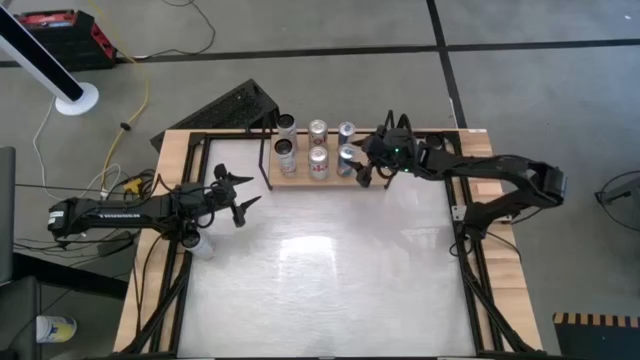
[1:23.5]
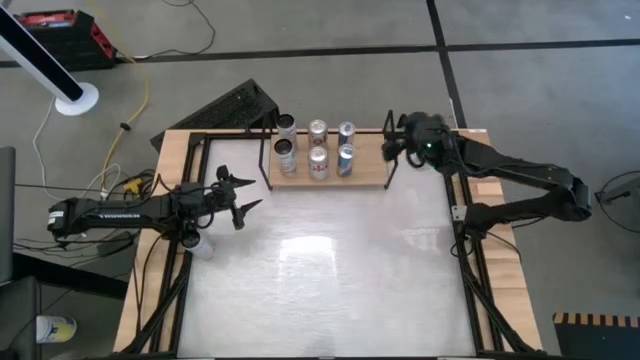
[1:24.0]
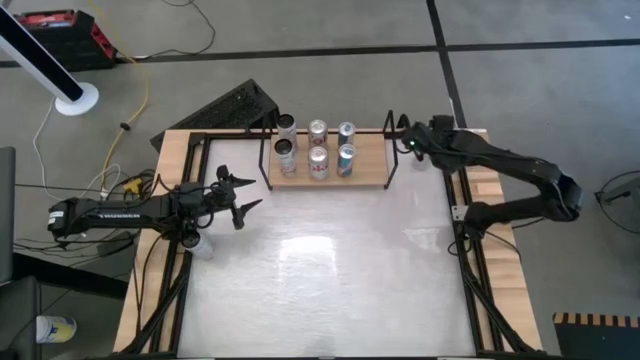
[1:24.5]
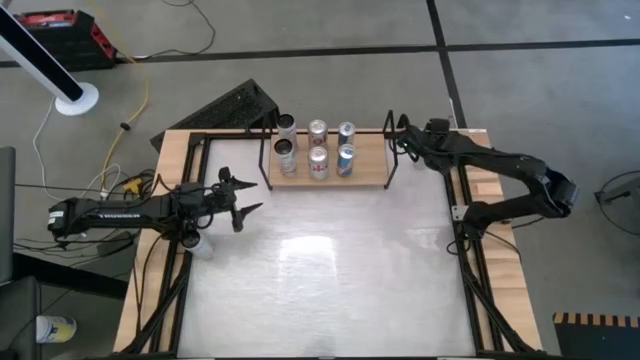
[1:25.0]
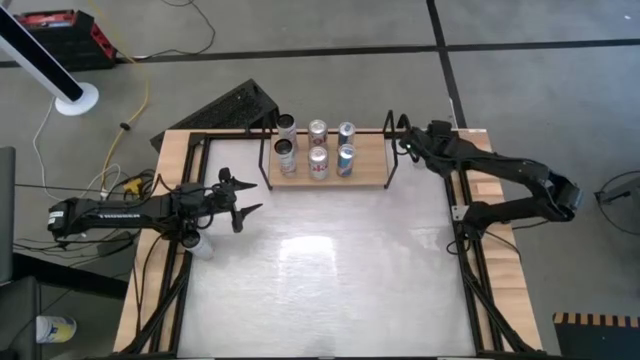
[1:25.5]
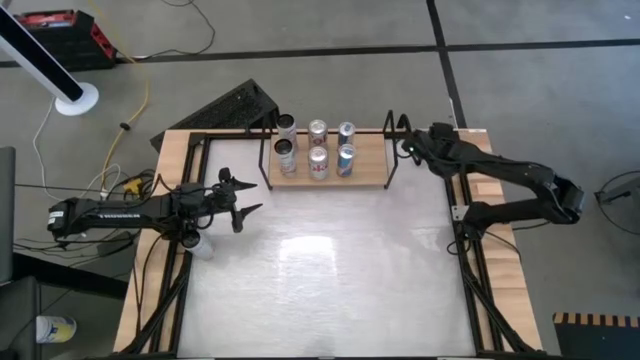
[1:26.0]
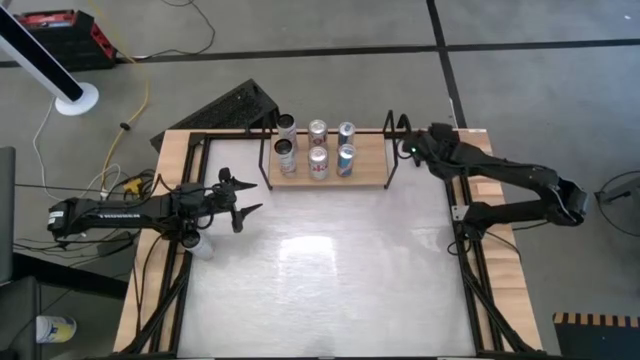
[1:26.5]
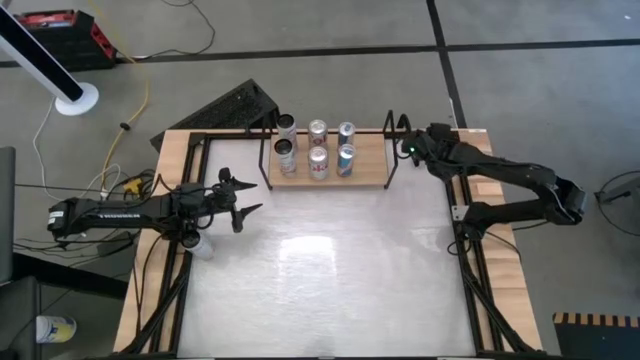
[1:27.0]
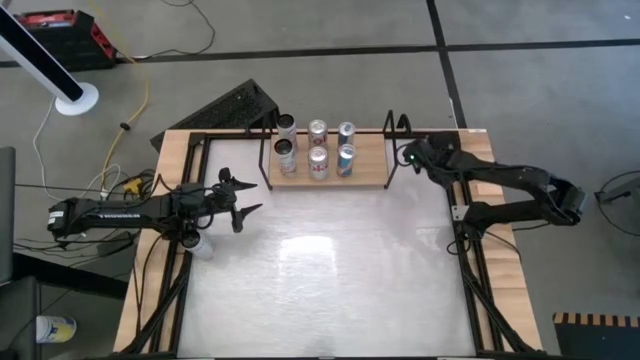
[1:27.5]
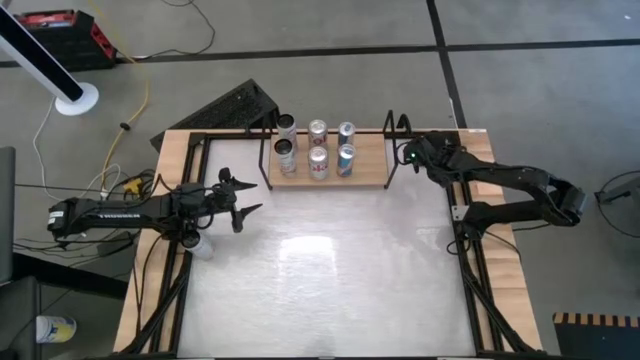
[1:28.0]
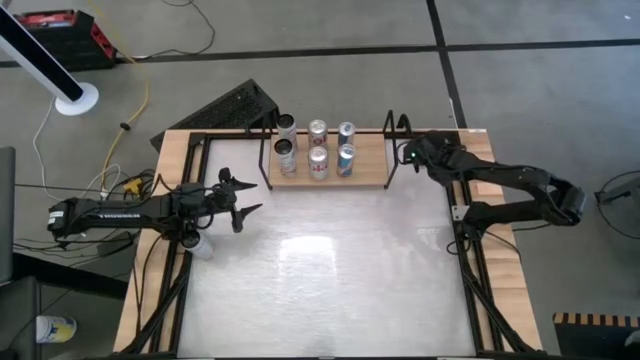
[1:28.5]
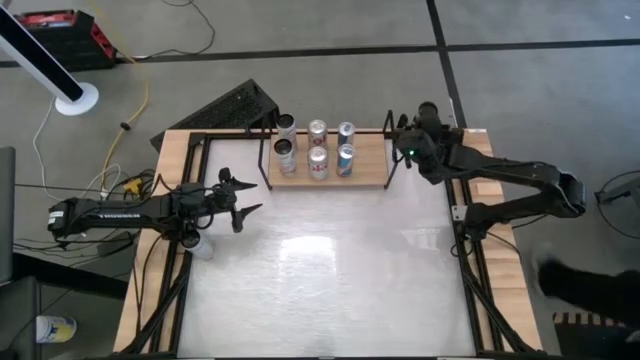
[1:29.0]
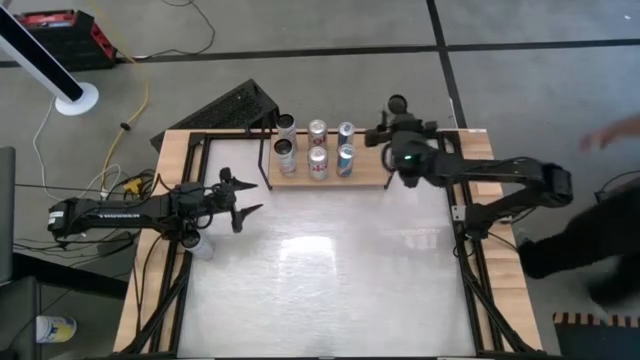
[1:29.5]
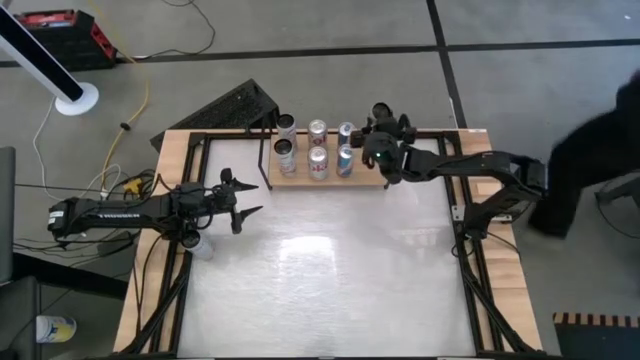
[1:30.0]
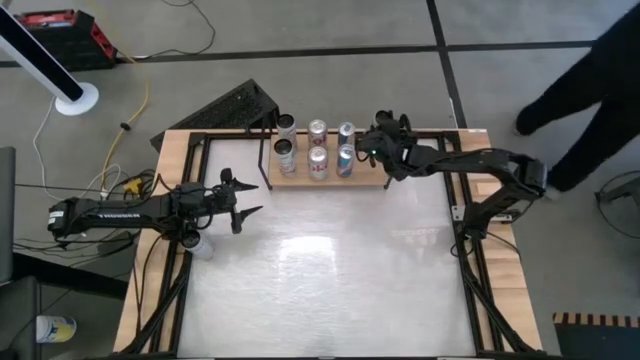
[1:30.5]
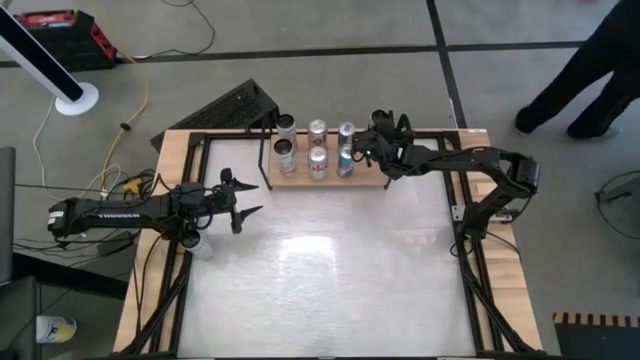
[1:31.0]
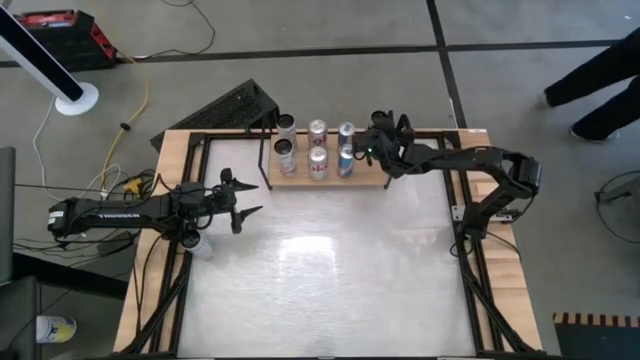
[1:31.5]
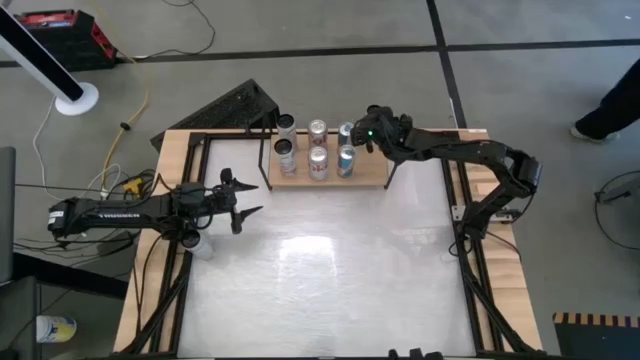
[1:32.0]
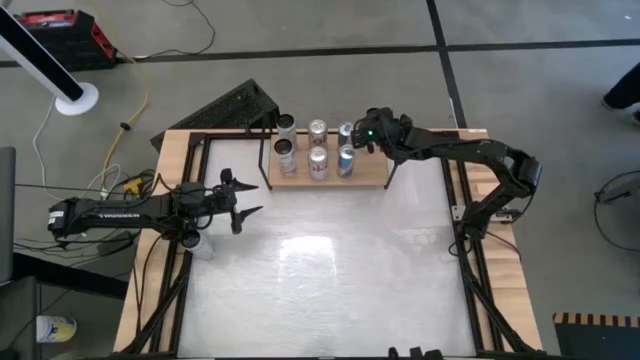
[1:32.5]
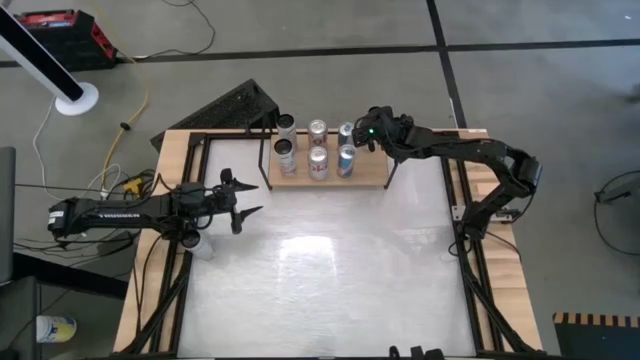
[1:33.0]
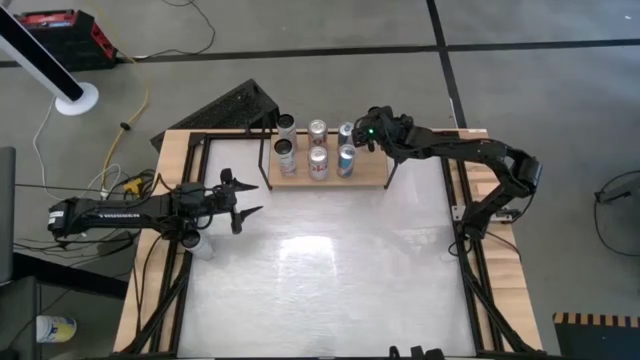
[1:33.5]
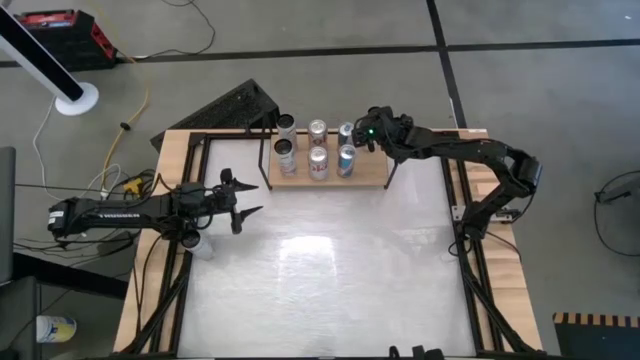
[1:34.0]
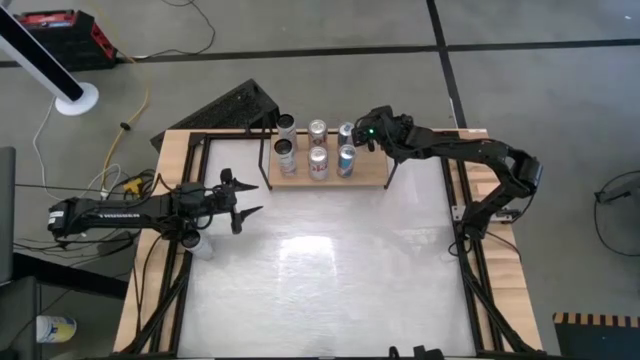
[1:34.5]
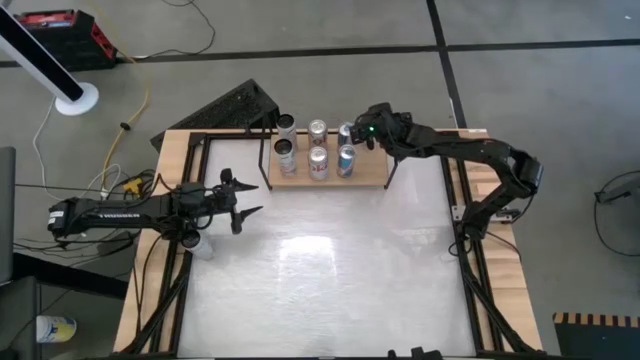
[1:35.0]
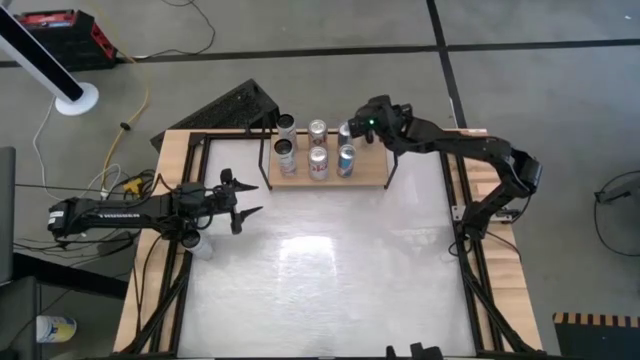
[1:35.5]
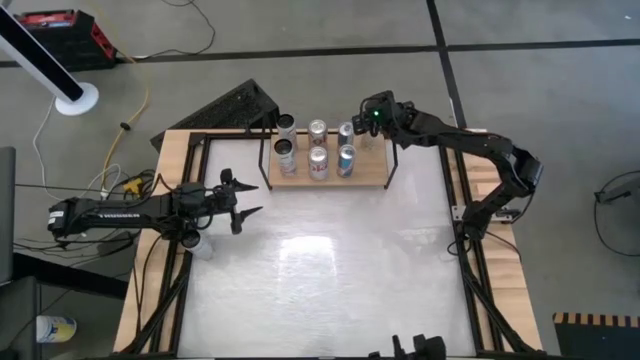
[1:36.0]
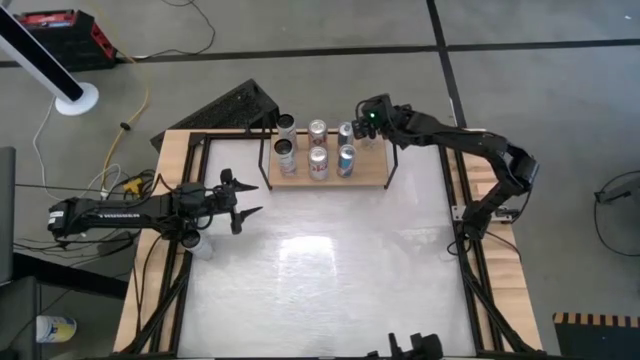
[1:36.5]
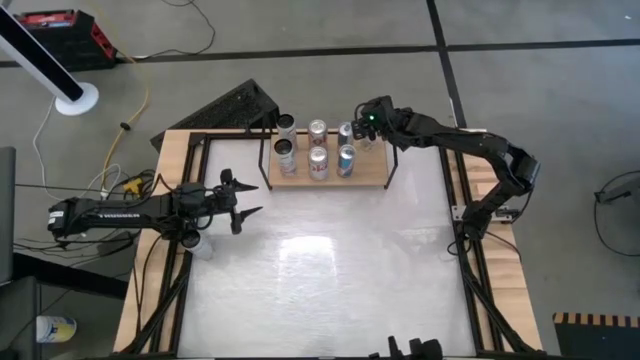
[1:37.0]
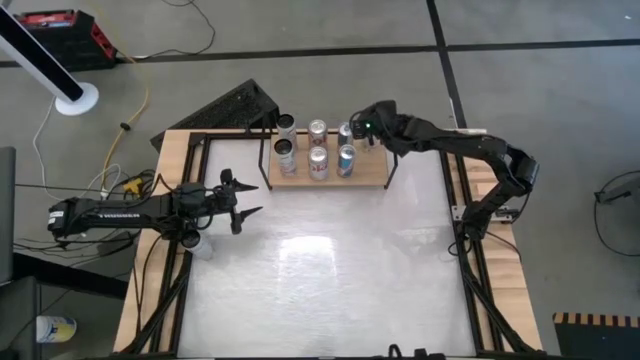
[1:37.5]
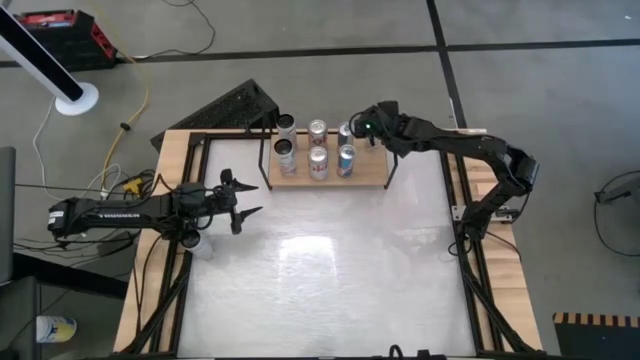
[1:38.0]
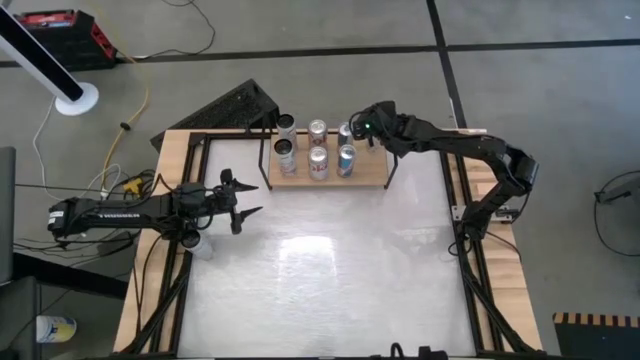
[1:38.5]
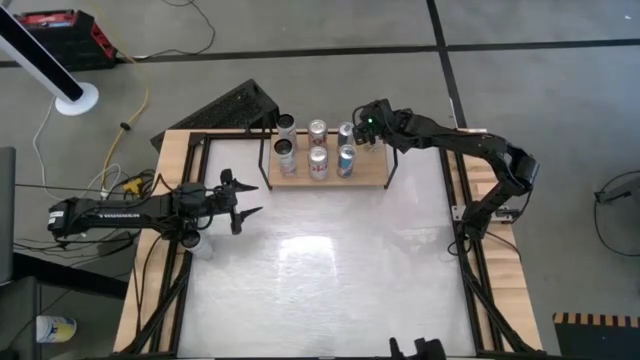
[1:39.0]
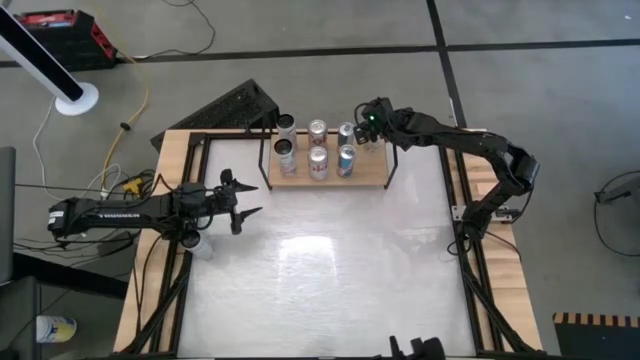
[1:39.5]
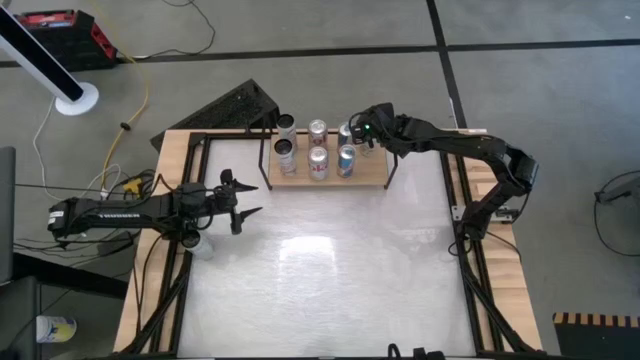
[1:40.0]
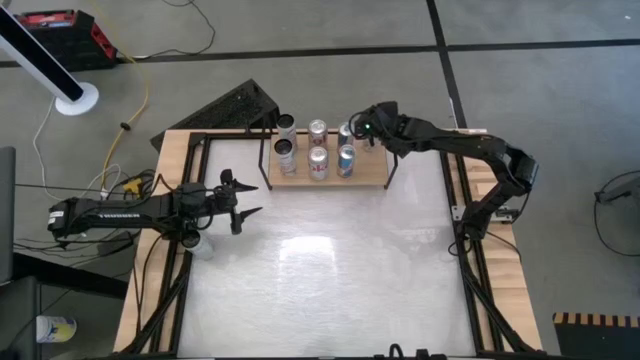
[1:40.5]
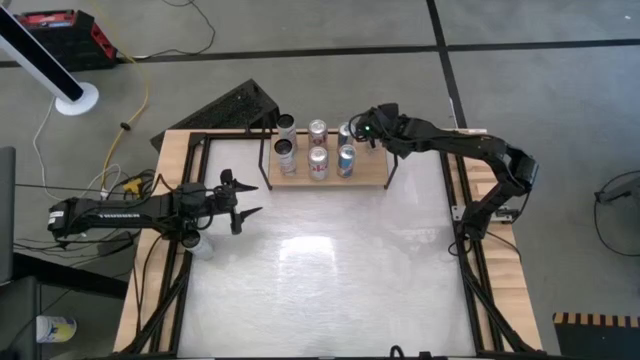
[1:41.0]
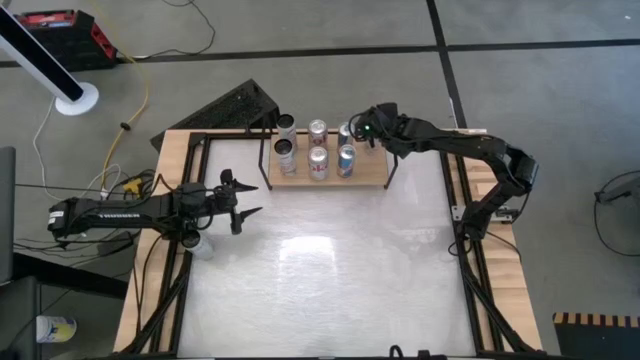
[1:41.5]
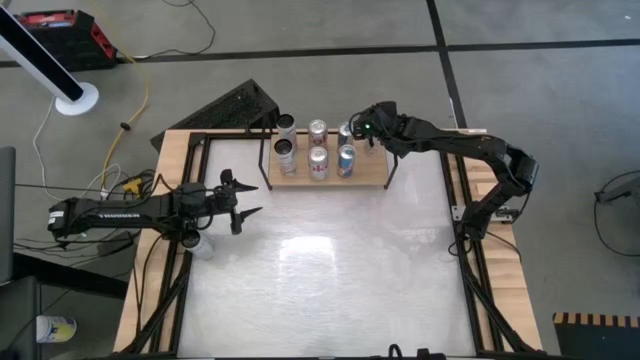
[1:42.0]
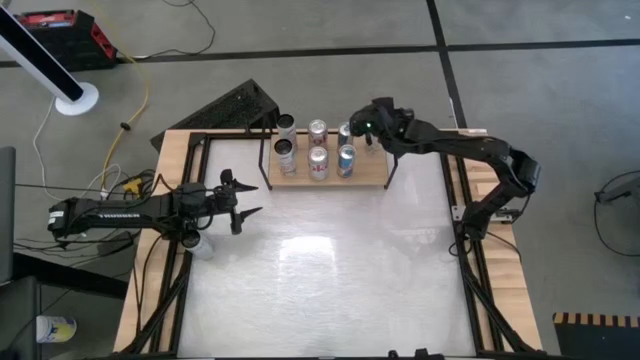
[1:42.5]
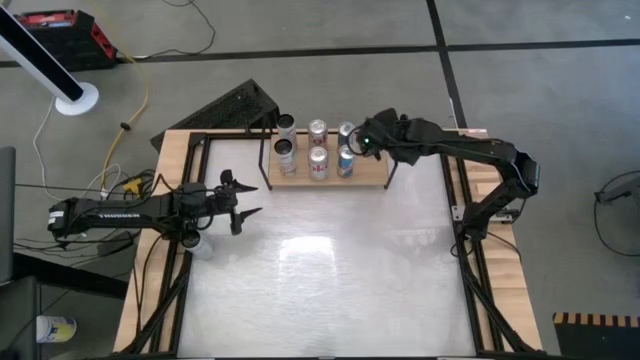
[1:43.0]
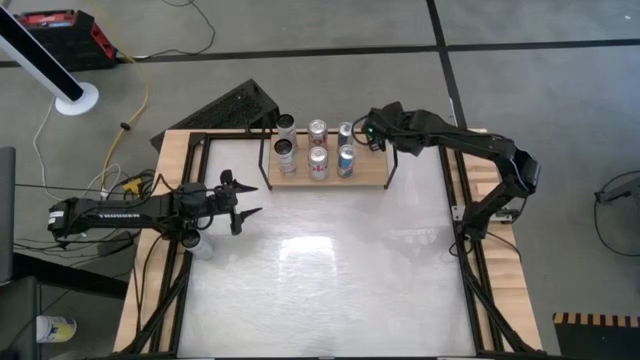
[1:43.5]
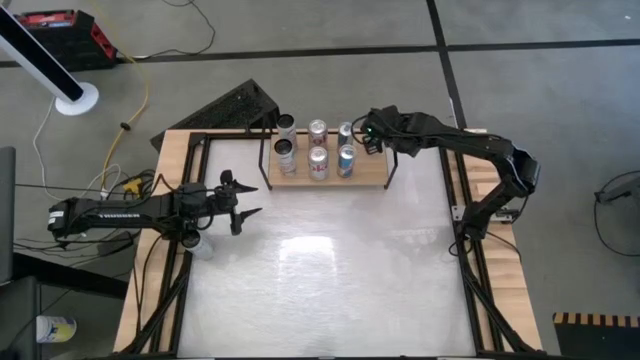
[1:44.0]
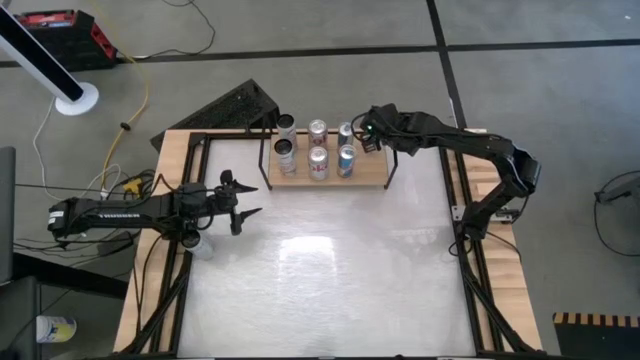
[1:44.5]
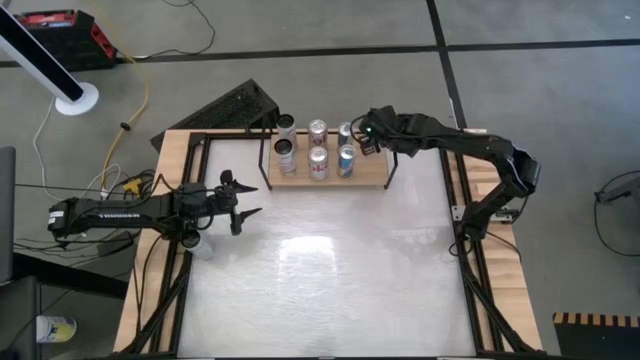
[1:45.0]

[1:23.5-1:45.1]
Task: Place canned beverage on shelf
Put the right white-yellow soda can on the shelf
